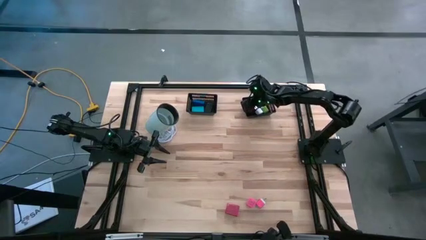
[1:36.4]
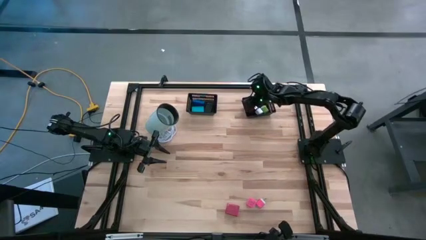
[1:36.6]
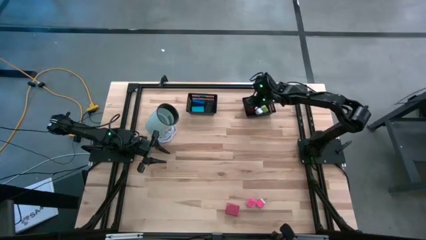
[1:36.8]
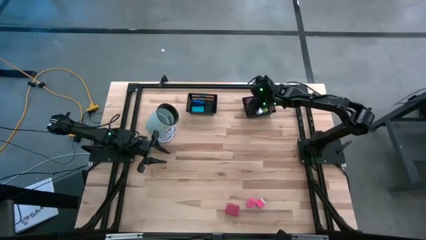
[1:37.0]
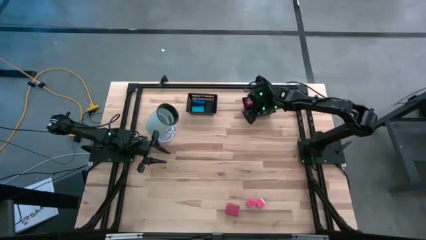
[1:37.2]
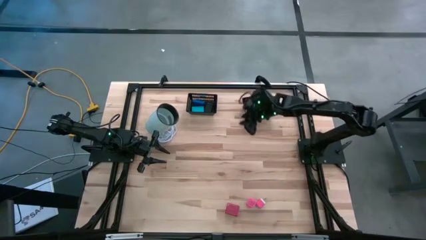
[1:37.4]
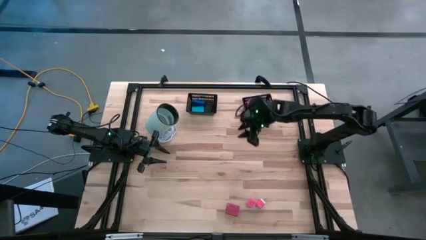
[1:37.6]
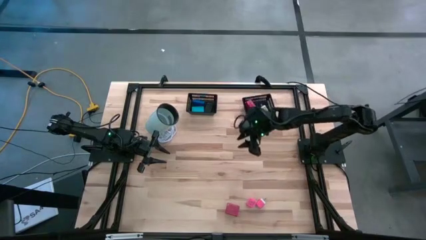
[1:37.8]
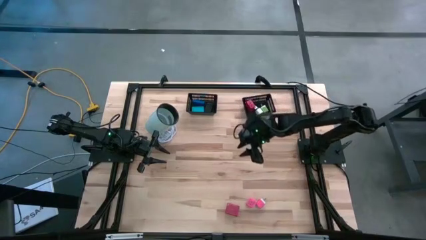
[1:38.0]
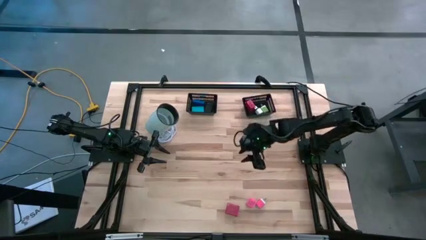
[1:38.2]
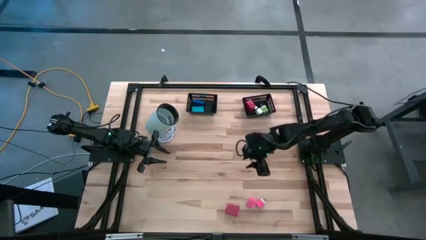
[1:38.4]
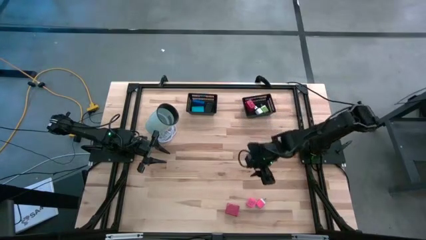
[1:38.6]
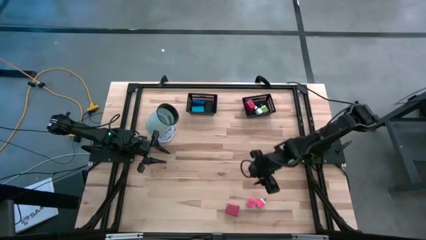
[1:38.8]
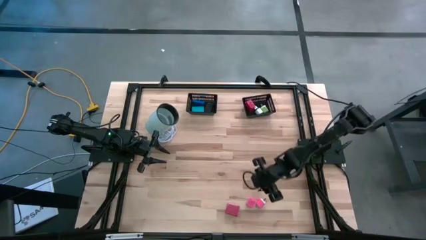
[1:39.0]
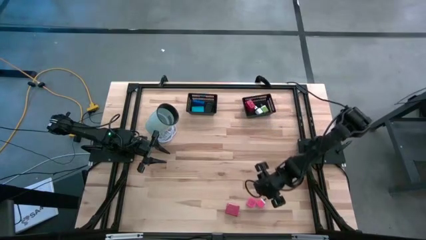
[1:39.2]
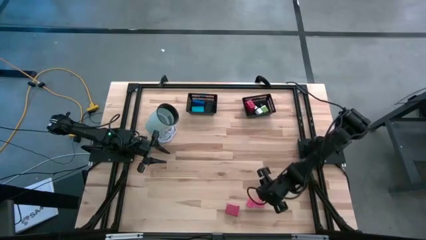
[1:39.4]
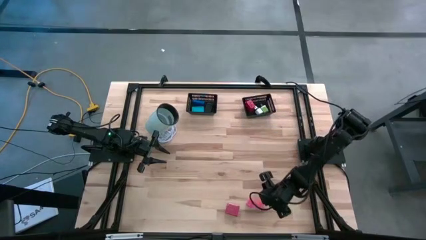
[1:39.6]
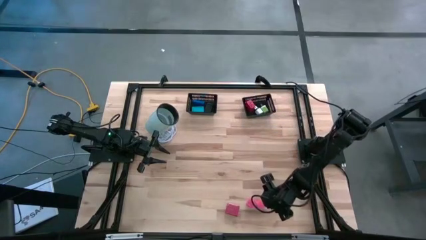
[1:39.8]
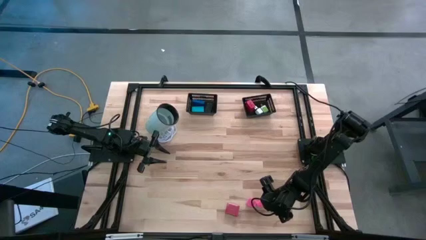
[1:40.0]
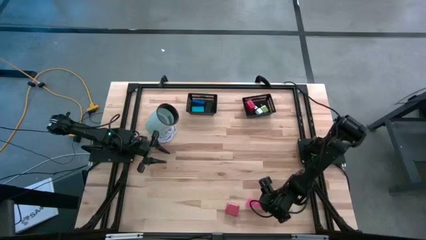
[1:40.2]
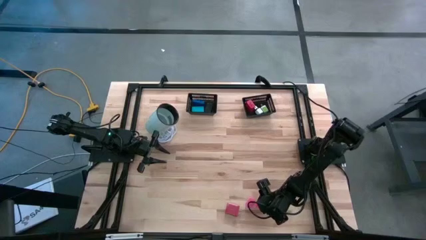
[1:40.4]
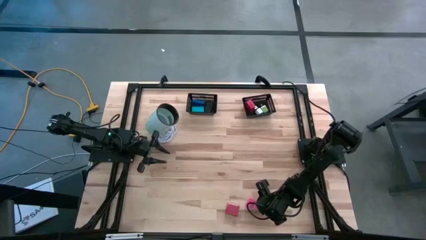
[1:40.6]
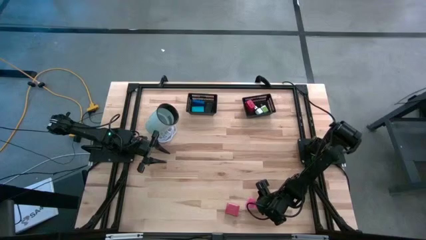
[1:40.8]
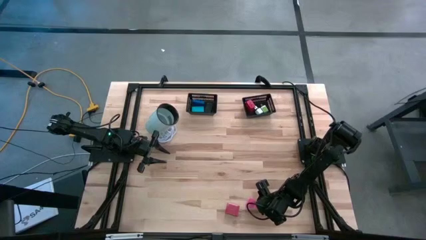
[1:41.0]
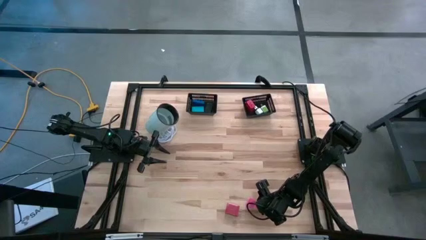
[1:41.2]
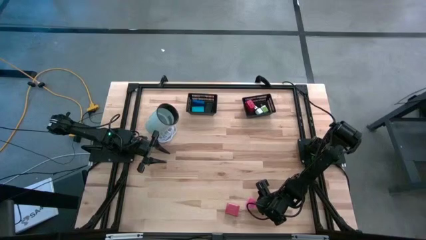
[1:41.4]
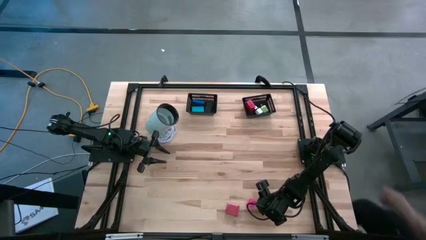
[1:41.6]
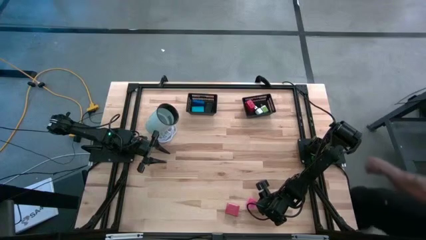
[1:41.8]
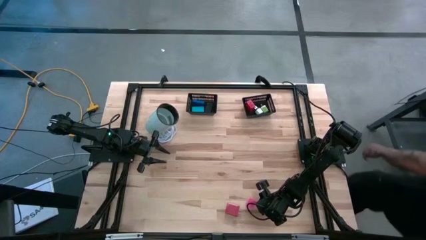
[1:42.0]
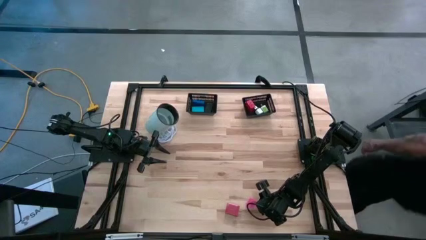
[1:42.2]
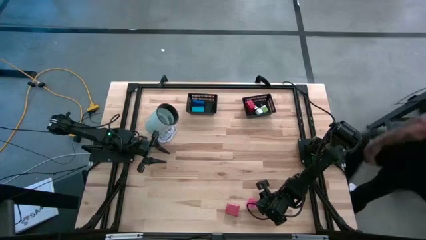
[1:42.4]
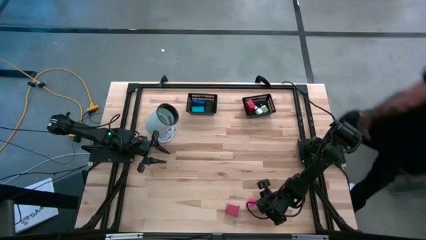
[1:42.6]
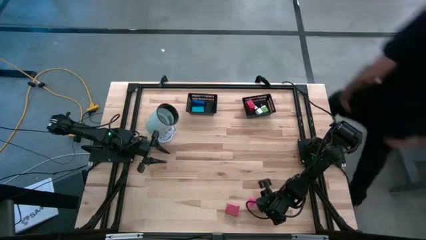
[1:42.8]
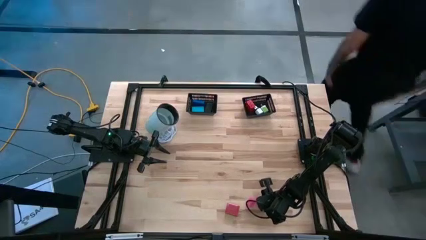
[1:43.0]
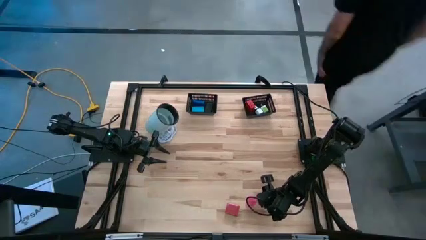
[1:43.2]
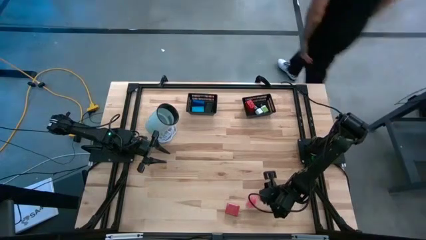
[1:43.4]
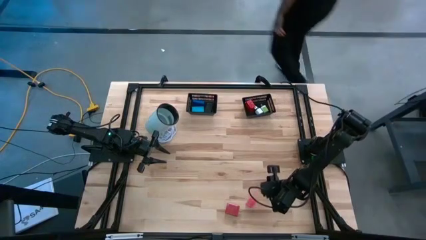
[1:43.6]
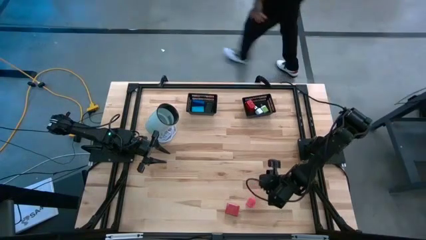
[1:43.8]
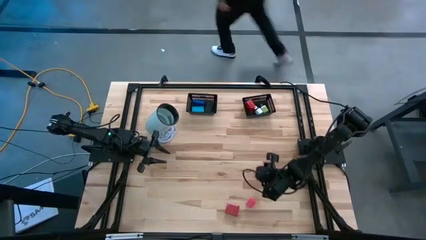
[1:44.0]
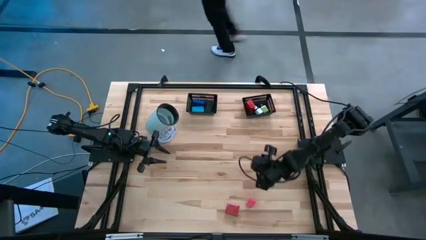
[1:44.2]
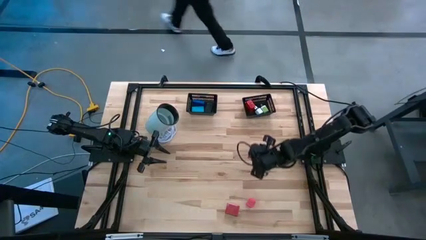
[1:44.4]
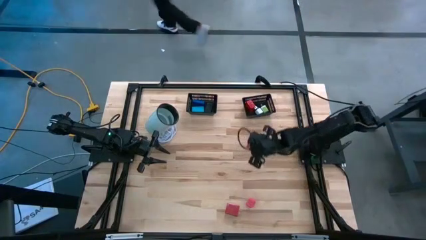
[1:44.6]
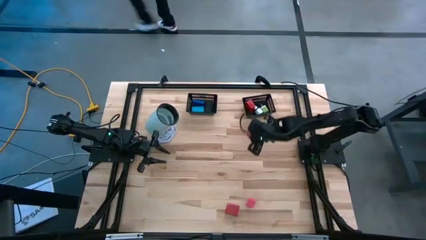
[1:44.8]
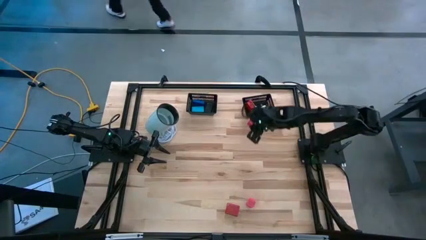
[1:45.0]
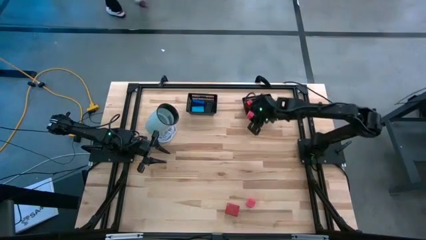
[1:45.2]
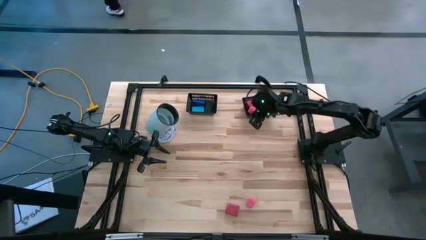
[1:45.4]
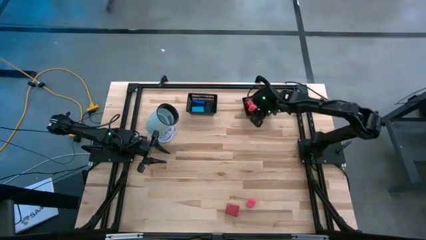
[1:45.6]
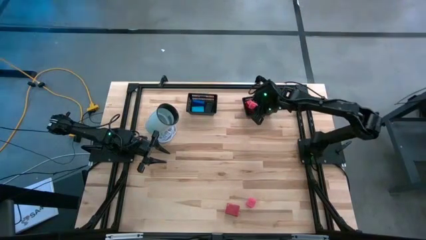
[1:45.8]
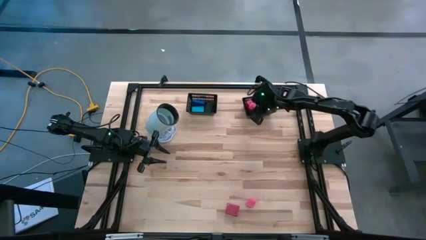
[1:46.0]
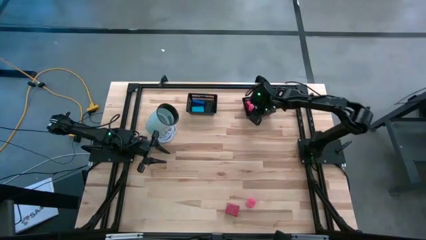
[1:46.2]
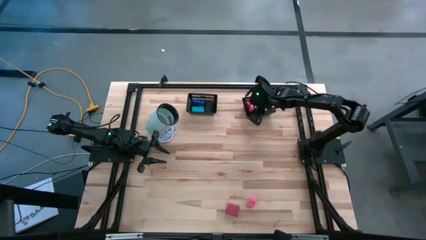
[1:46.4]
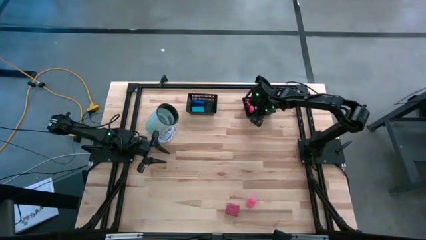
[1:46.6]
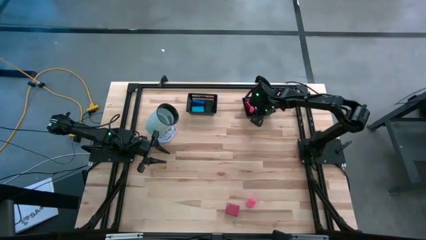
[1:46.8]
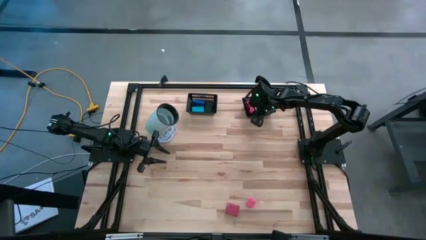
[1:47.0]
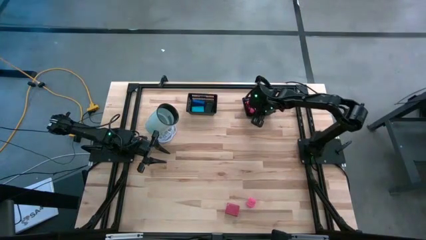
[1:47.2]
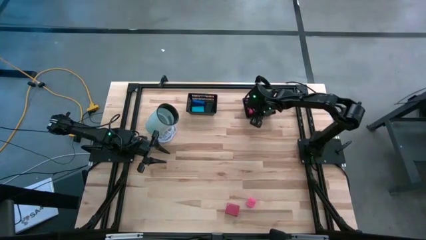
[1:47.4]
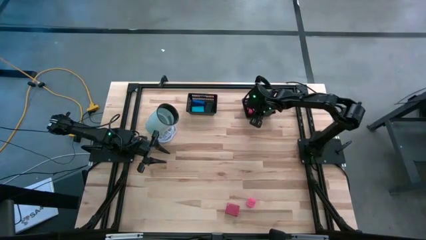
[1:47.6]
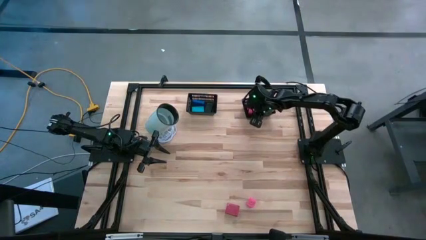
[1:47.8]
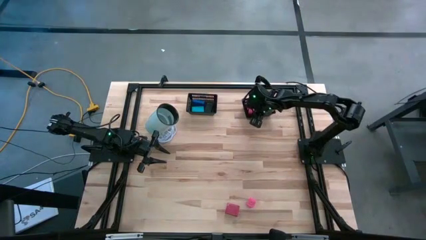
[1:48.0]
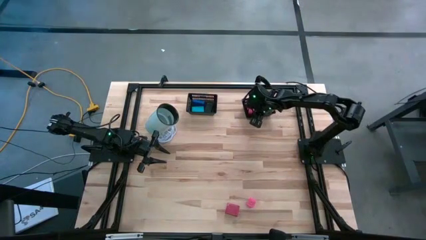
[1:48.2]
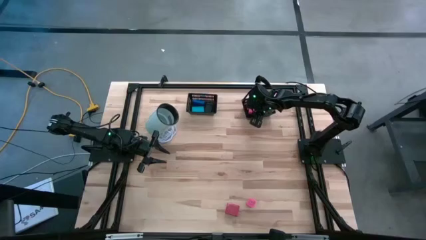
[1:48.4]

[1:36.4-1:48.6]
Task: Pick & Place Office items
Put the pink charger adapter into the right black bin
